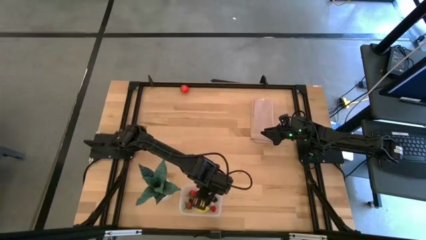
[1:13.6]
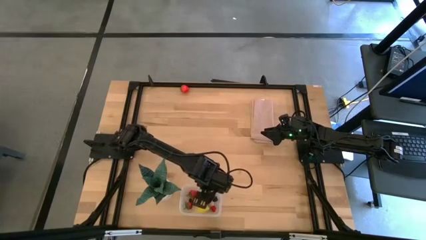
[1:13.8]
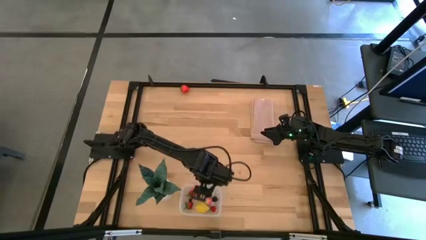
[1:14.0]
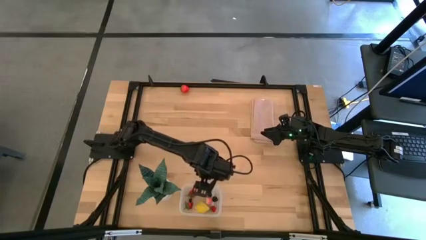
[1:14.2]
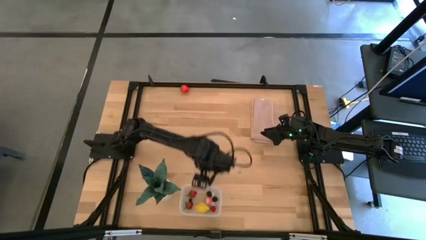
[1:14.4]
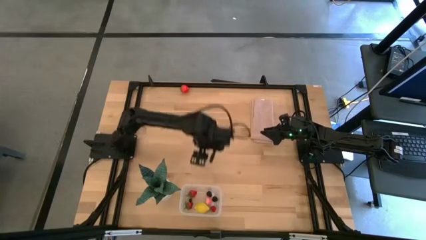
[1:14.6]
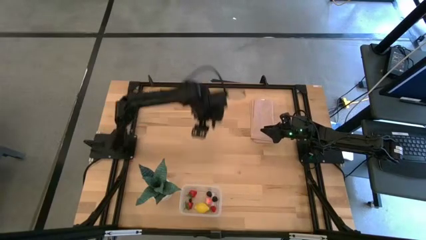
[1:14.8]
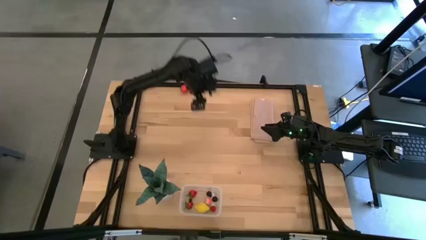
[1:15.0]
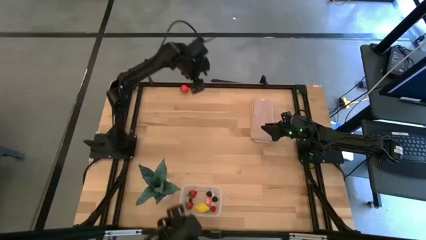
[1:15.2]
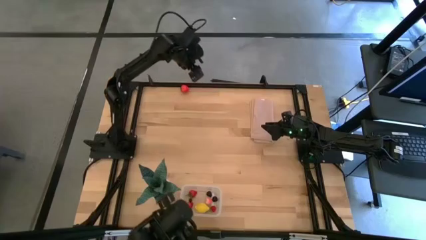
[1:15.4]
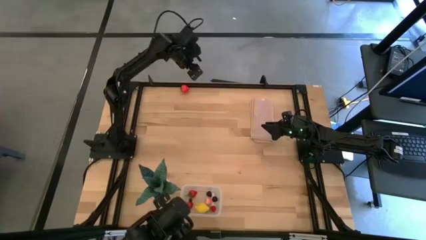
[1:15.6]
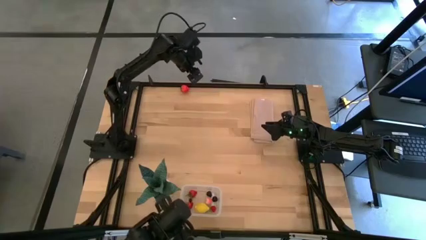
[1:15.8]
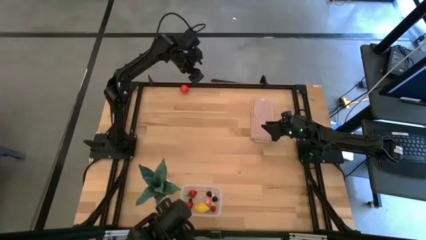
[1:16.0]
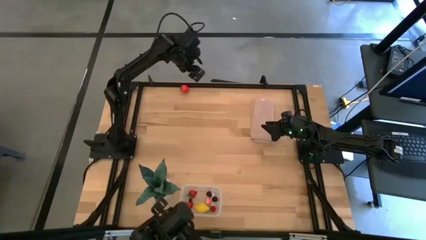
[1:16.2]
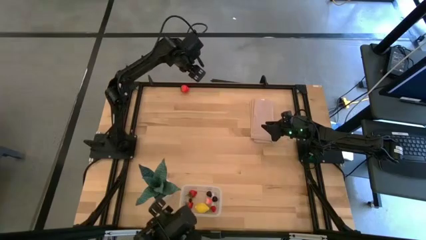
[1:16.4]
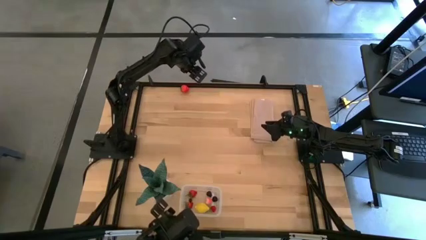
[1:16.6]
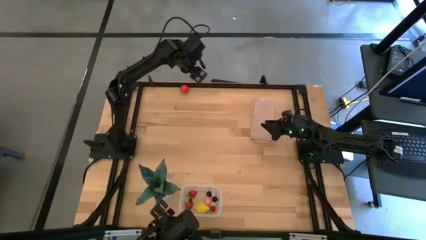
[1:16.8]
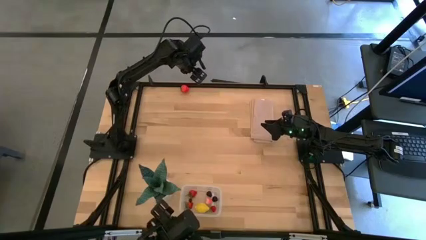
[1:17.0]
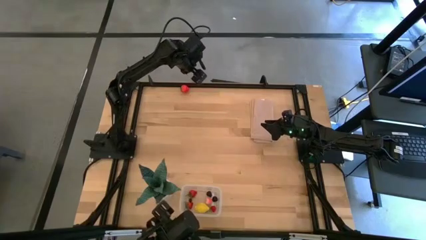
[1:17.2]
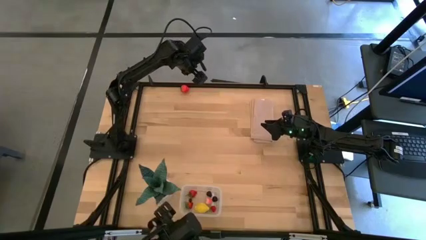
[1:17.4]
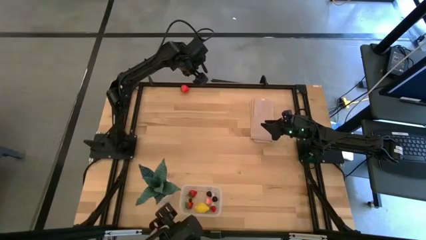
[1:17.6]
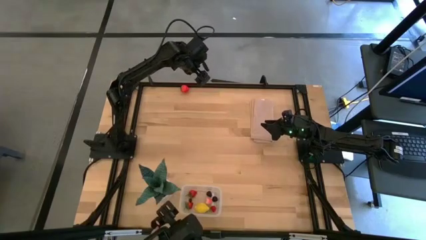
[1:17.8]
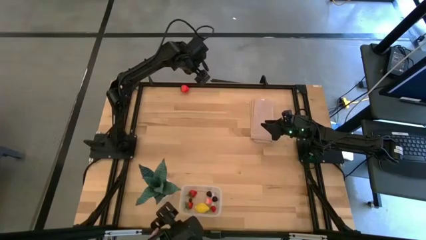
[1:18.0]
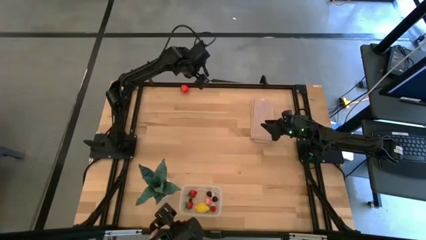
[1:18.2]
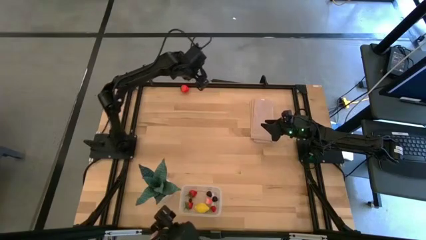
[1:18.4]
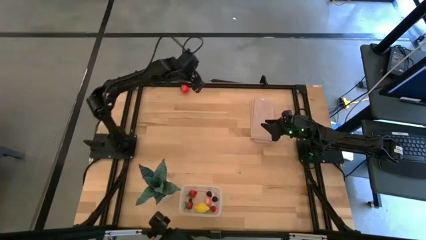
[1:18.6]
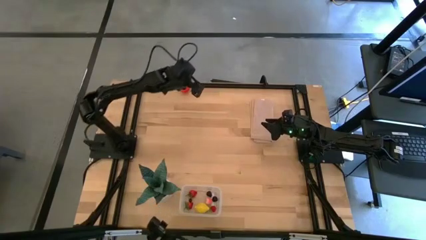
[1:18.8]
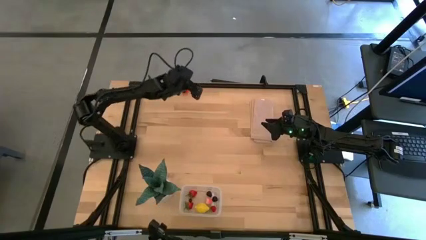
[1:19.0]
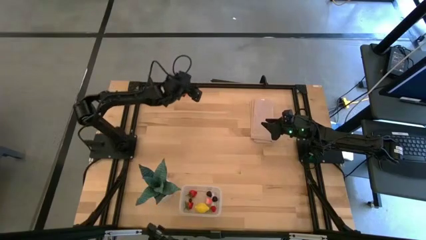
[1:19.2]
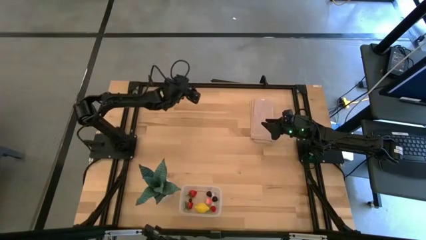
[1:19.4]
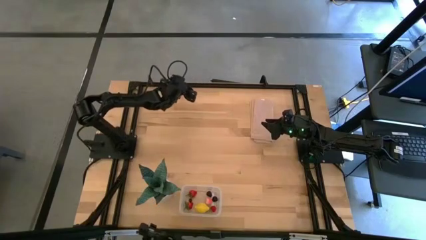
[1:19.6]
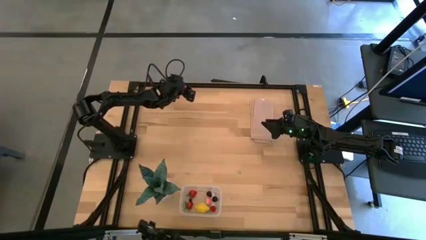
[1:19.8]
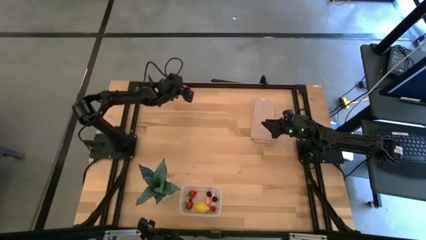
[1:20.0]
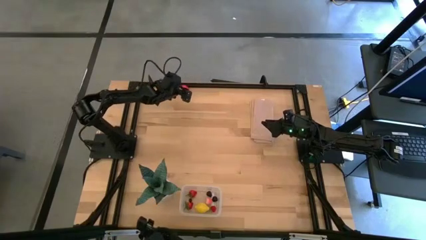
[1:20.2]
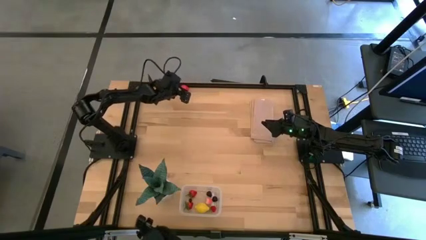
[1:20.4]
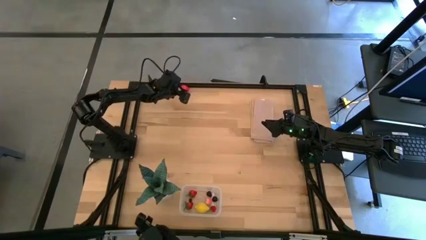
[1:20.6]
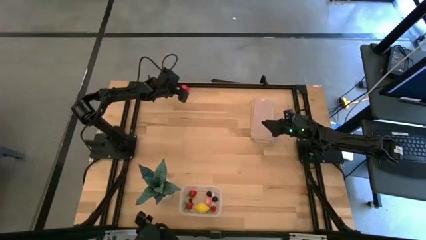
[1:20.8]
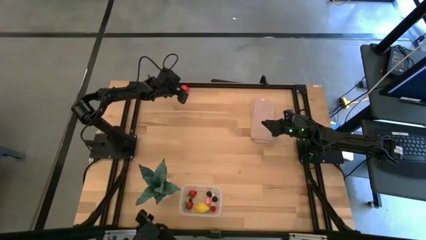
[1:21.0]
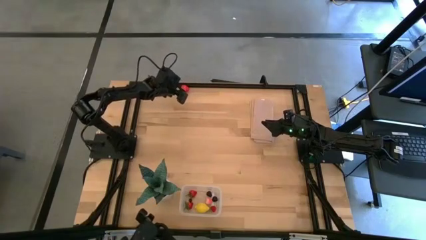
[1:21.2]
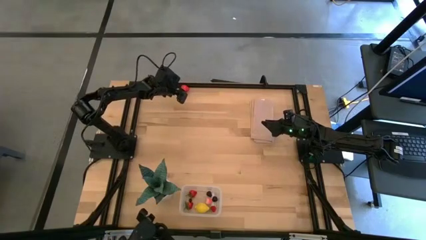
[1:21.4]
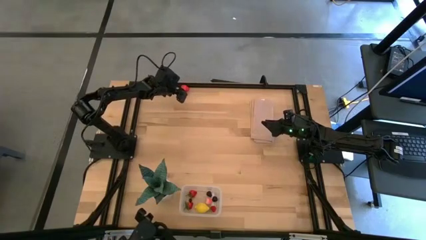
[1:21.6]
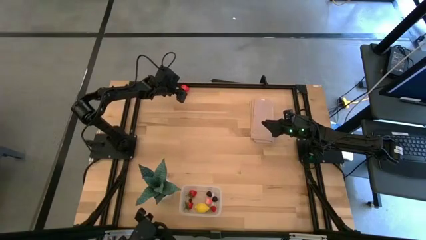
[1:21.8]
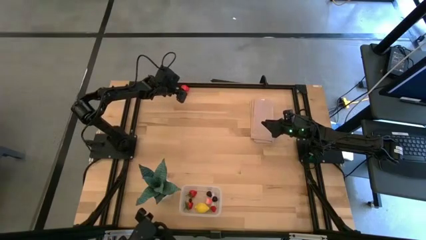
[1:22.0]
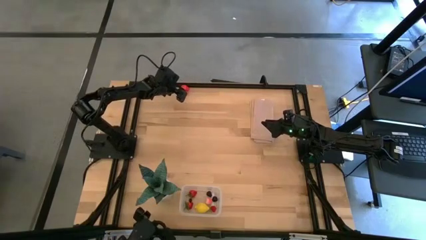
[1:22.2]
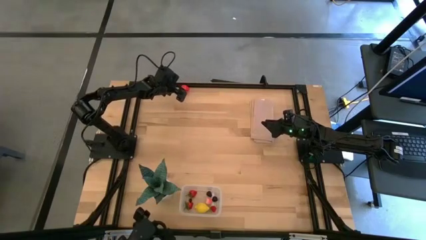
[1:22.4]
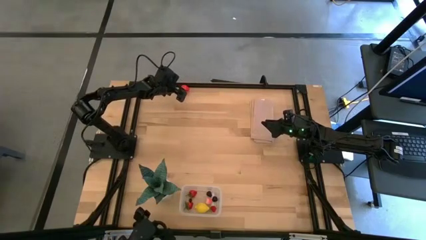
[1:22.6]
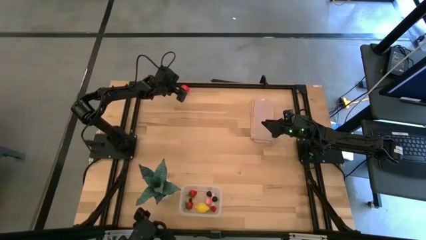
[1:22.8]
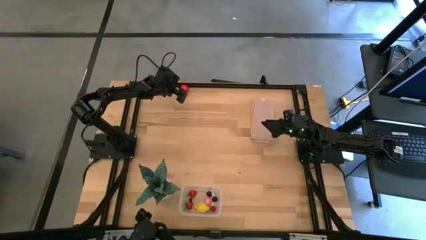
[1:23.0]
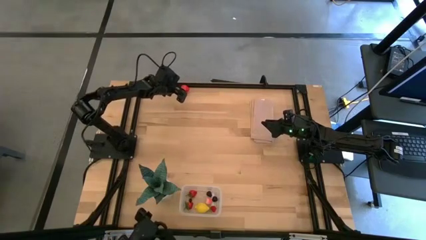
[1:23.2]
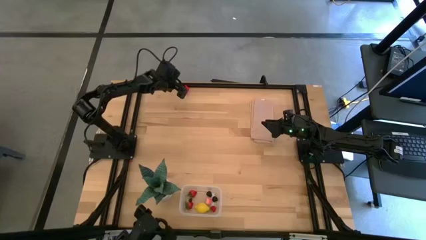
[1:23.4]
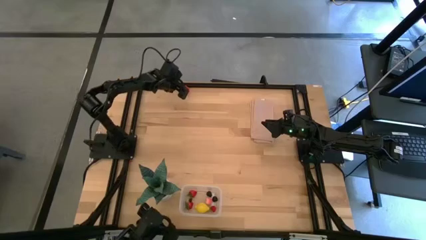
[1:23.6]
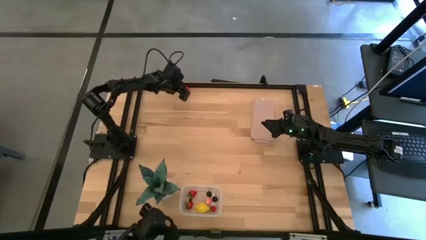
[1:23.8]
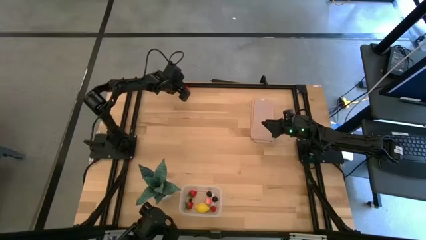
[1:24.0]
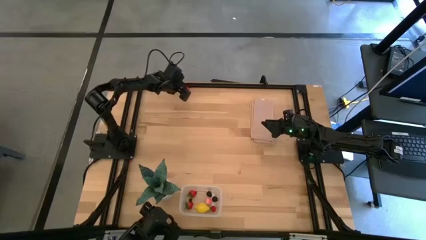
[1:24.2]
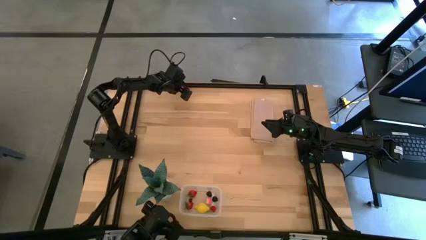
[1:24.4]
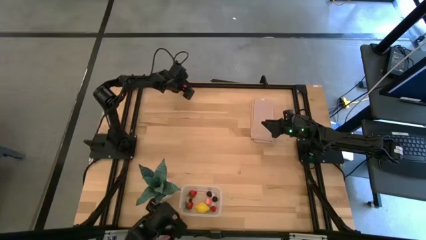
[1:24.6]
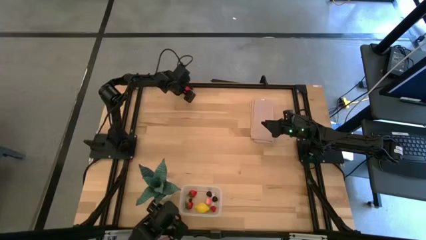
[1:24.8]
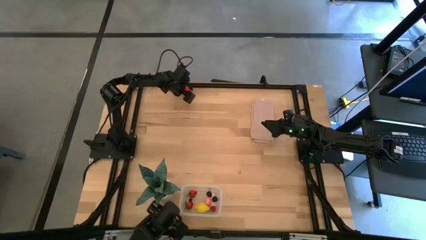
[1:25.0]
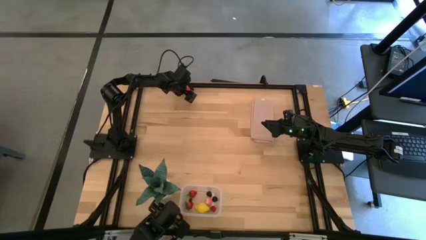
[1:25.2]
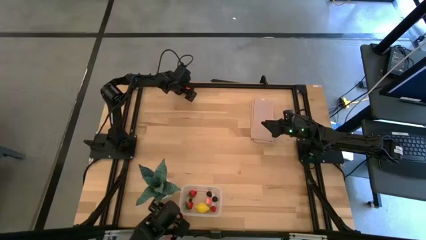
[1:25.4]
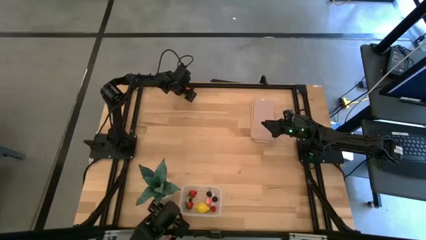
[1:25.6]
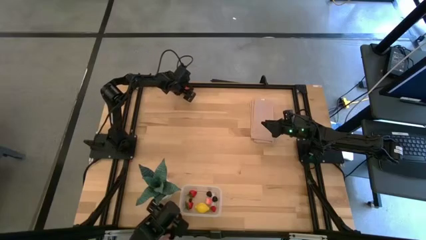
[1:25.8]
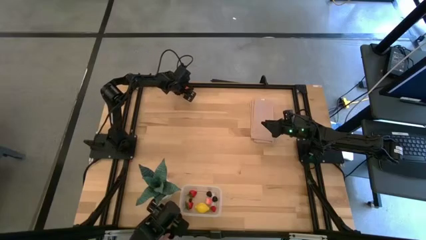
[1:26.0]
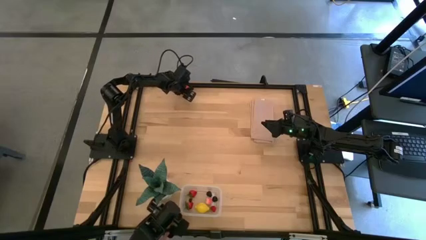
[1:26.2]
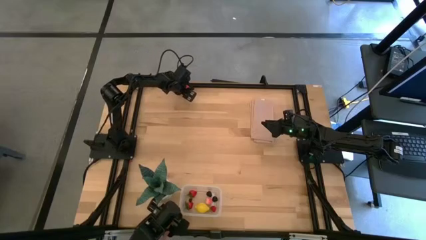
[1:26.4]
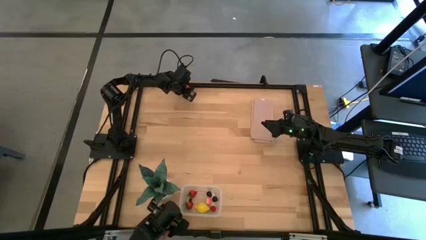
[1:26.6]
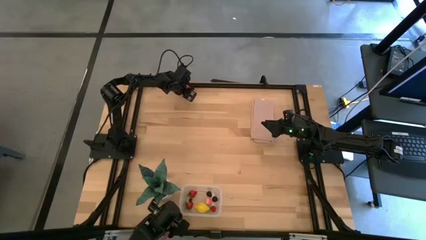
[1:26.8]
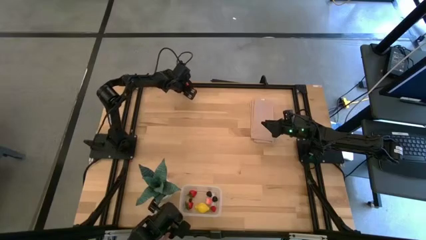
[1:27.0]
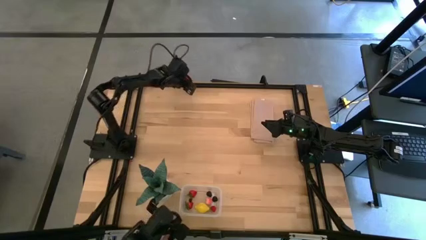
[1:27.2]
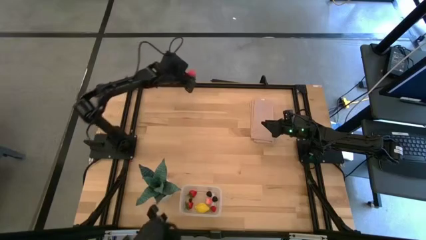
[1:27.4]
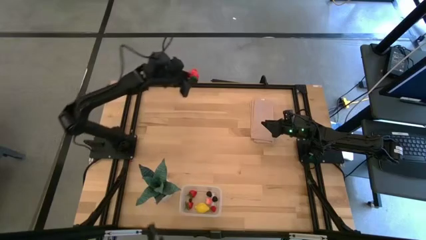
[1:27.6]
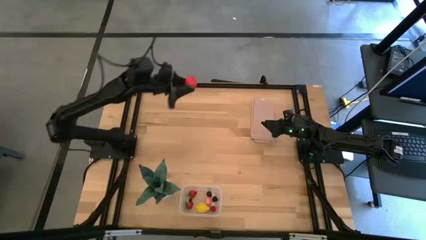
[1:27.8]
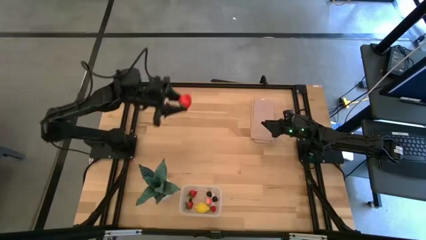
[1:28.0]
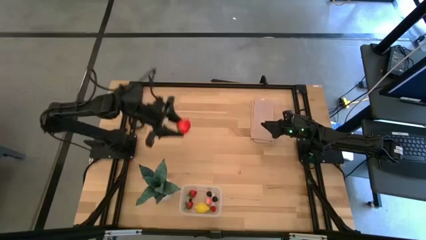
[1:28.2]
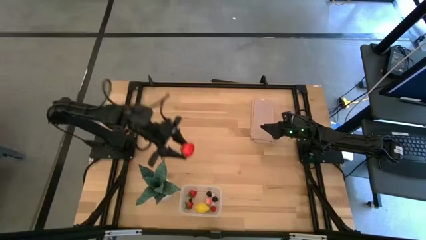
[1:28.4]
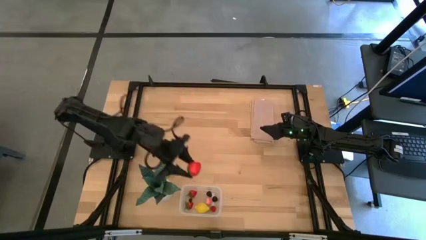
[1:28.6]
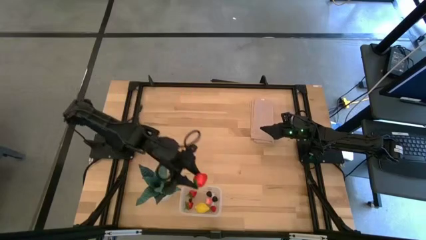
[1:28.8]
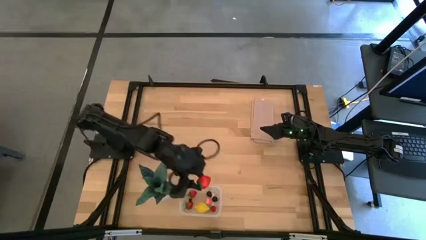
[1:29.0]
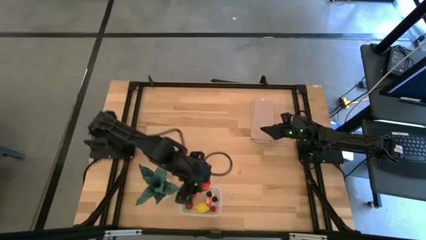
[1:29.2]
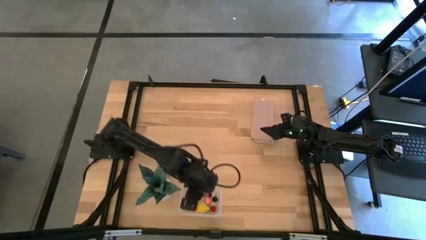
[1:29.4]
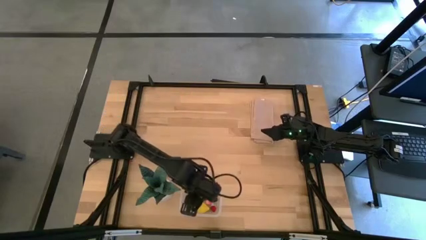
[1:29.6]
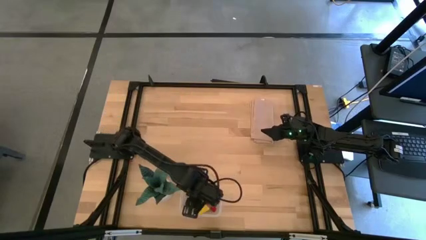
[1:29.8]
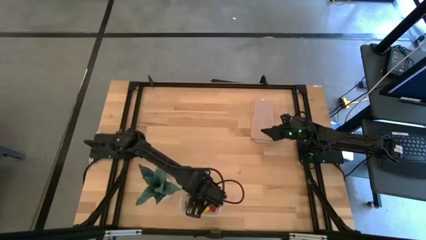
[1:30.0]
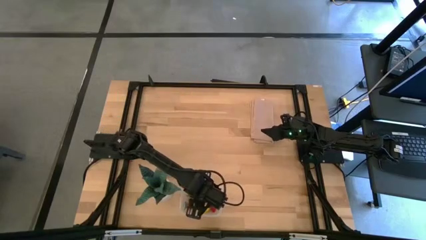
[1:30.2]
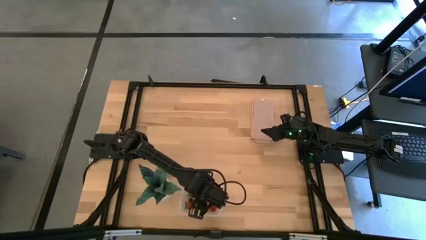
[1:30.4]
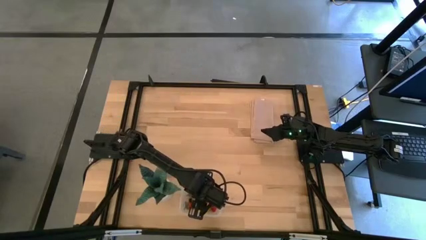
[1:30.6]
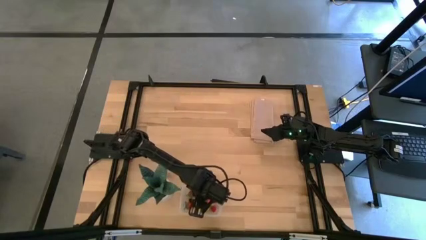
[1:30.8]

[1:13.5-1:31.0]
Task: Pick and placing Produce into tupperware
Put the strawberry into the transparent bin
